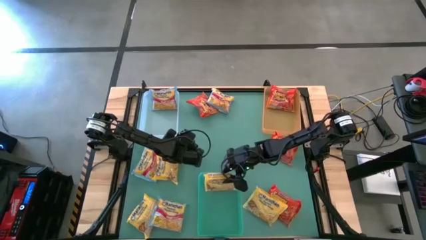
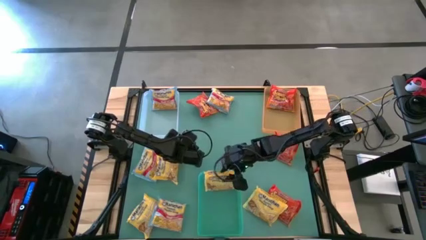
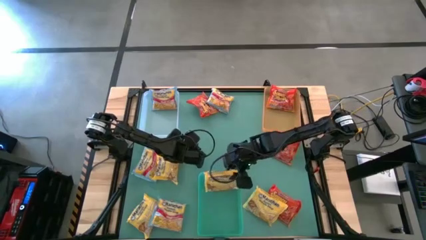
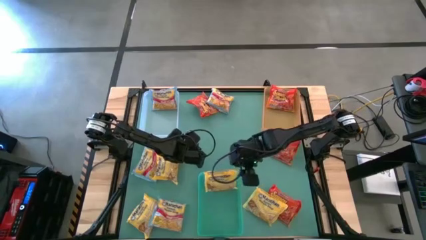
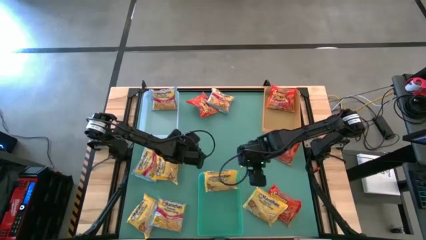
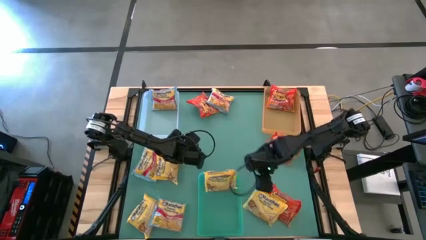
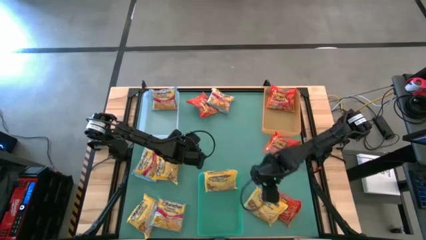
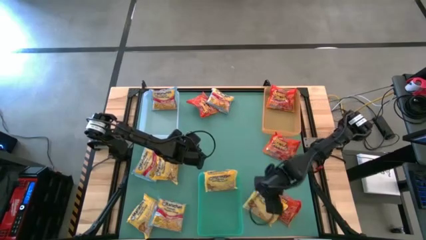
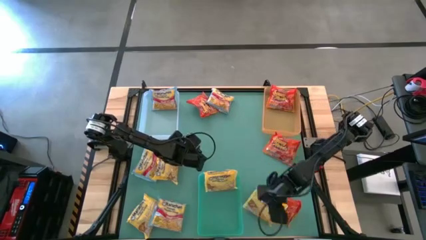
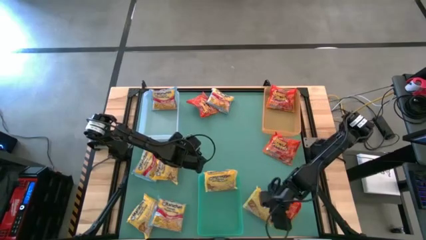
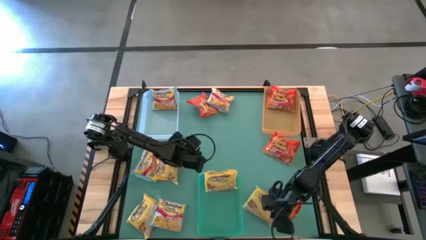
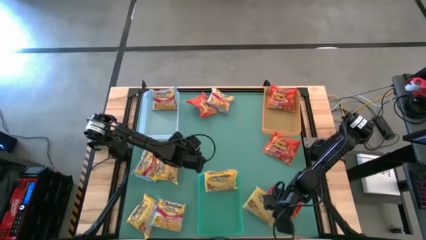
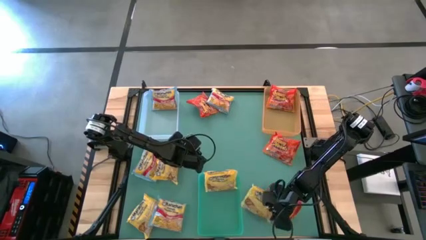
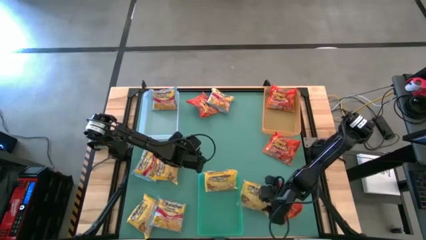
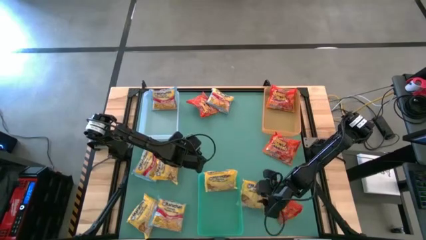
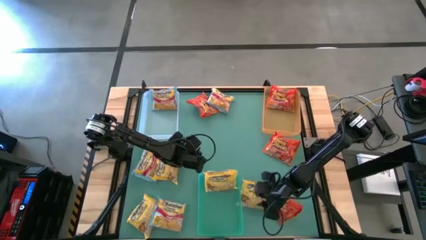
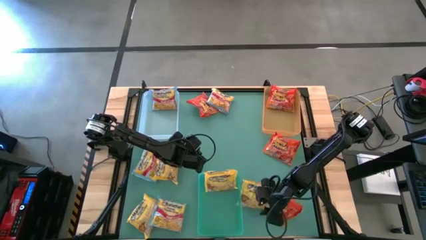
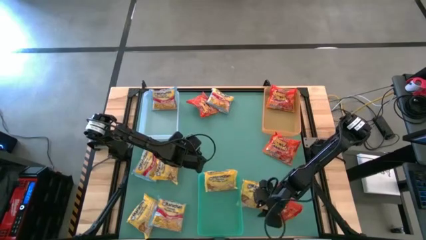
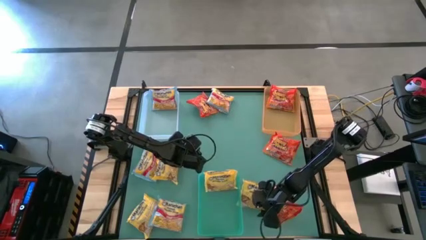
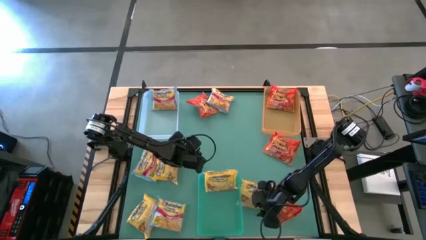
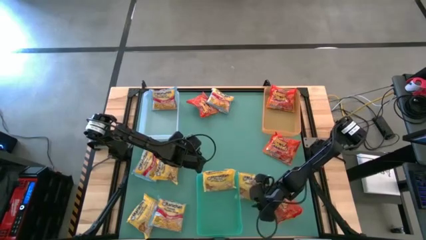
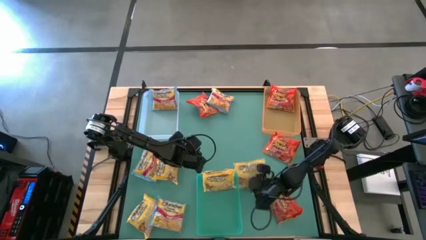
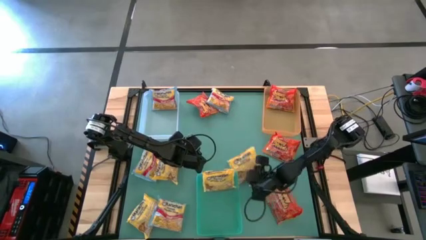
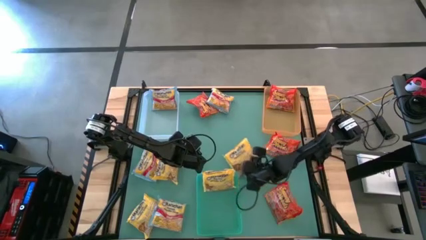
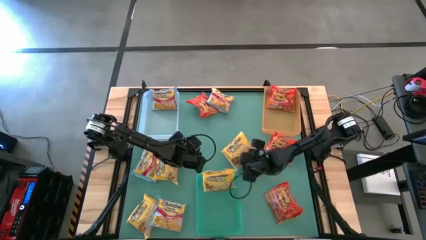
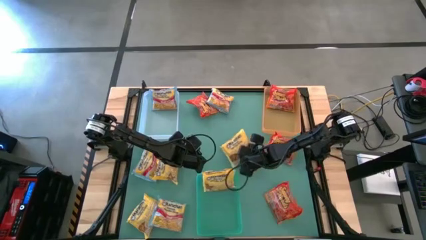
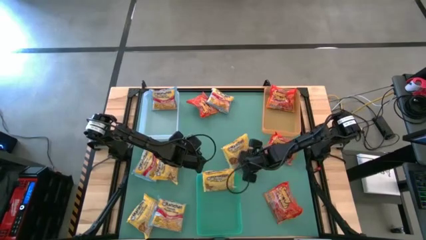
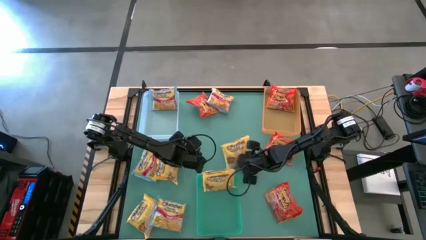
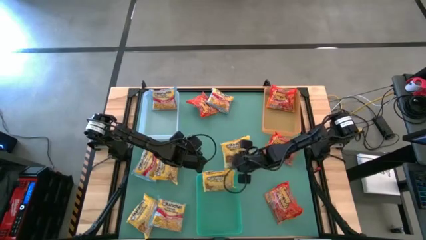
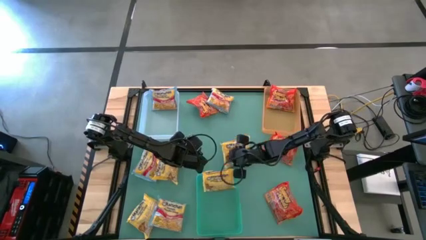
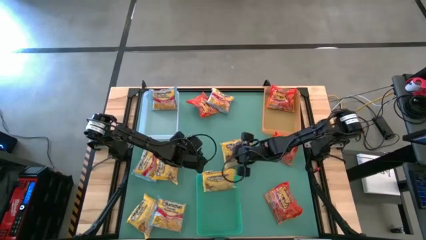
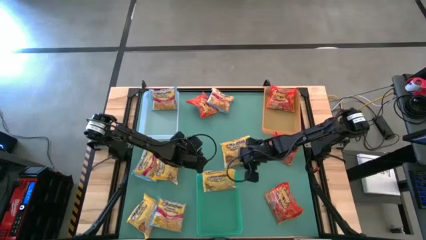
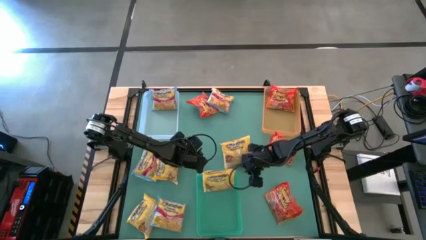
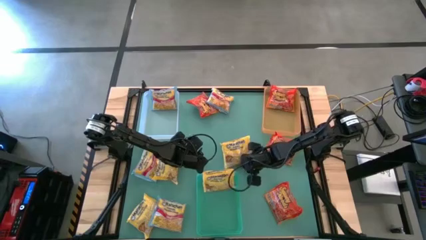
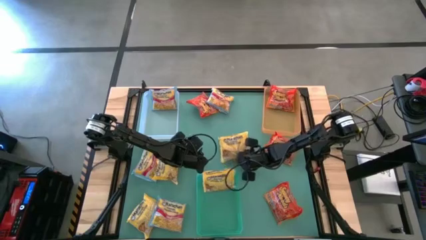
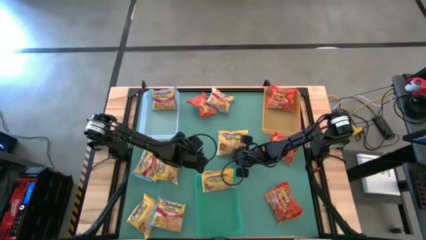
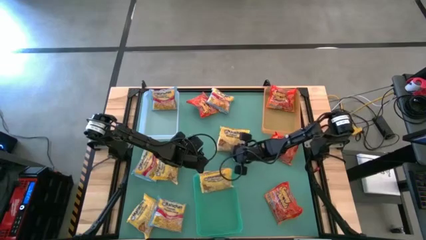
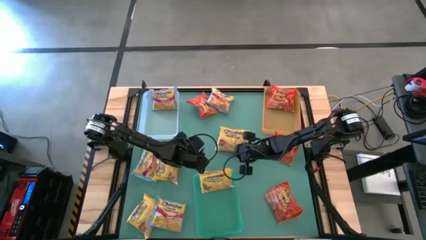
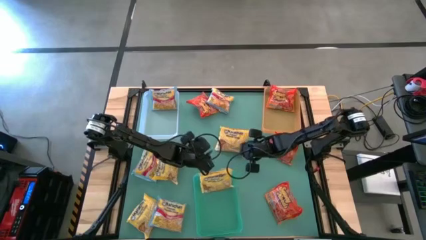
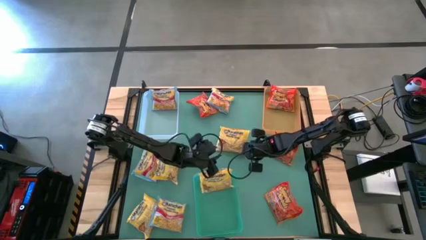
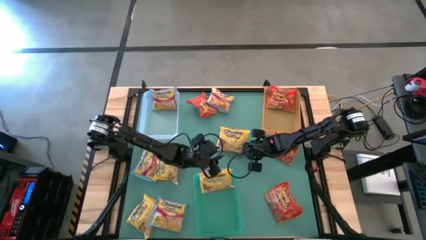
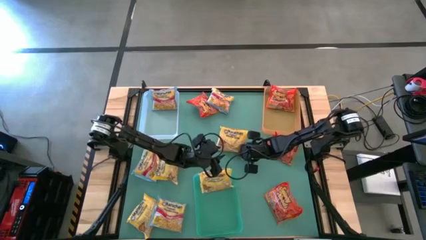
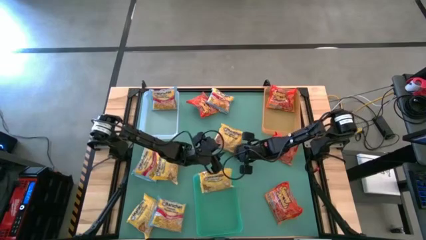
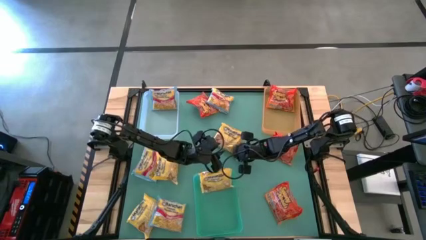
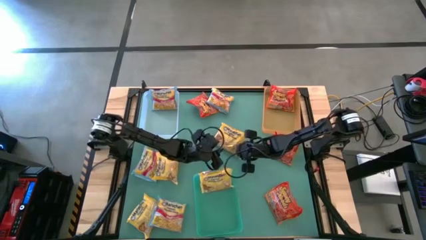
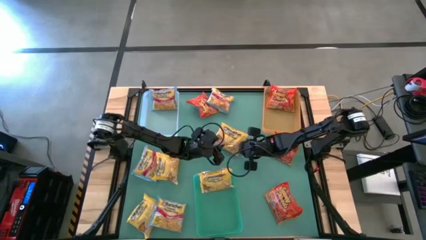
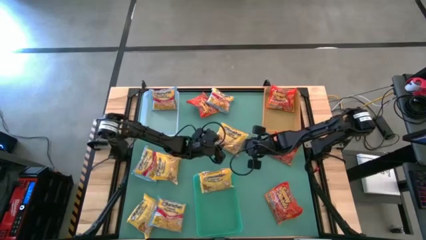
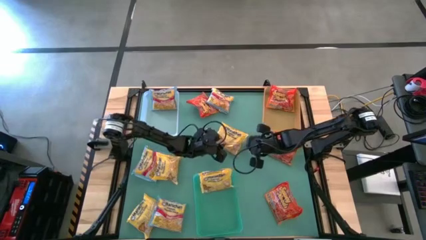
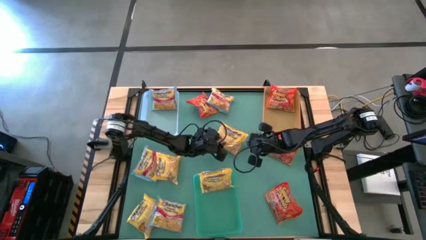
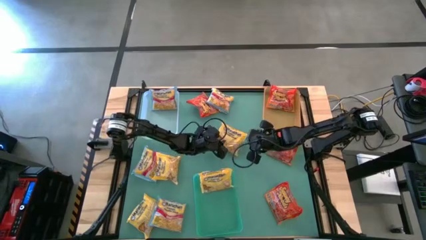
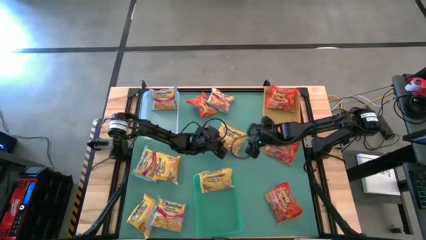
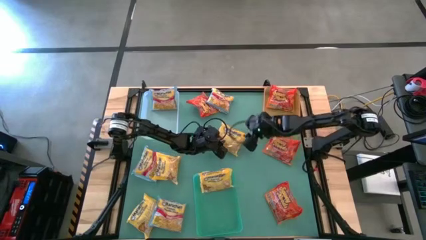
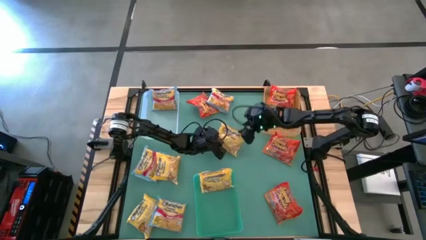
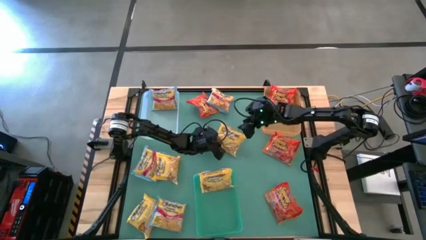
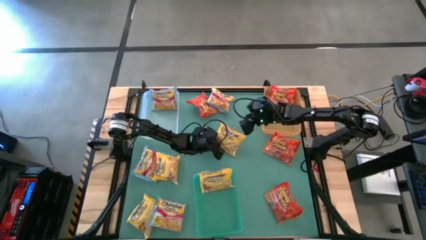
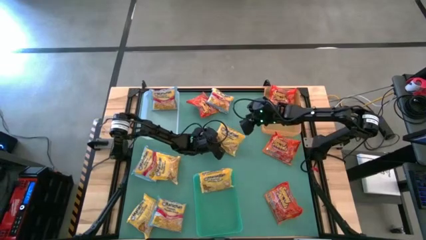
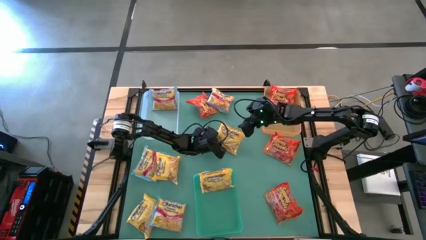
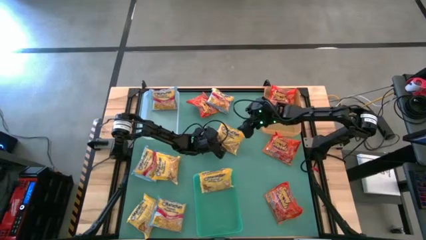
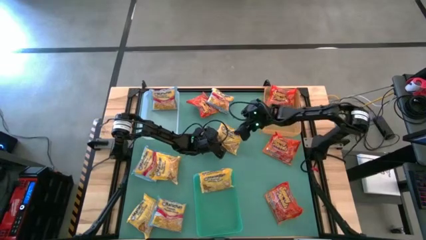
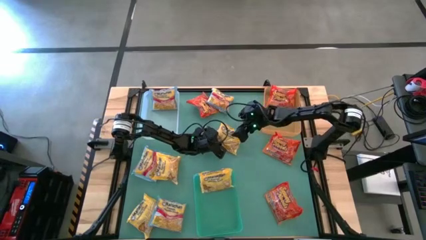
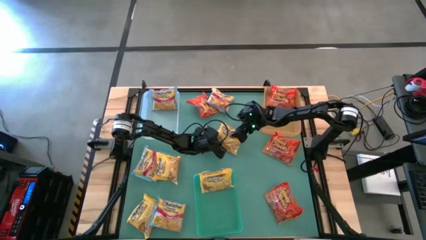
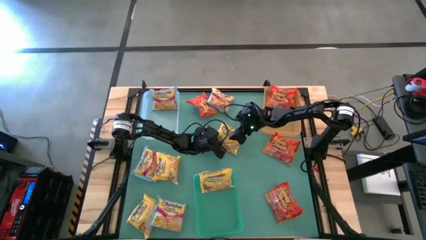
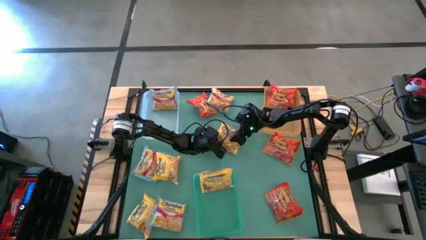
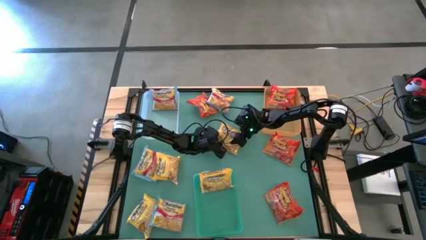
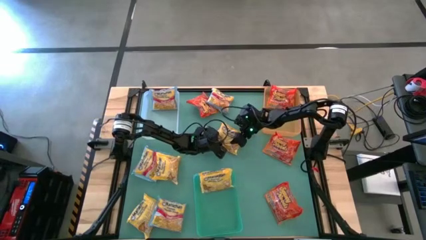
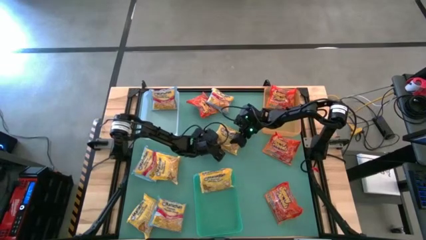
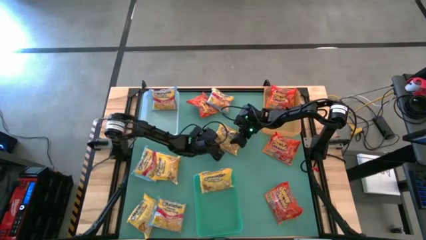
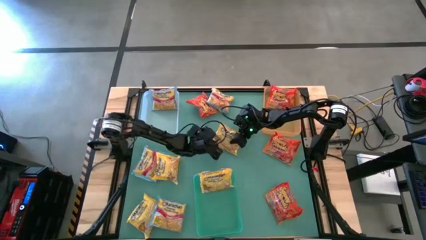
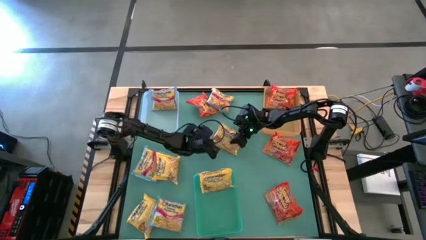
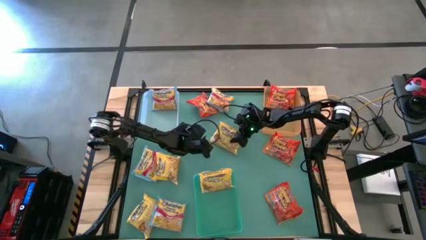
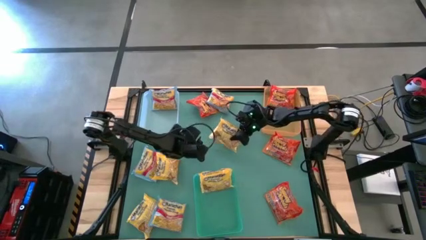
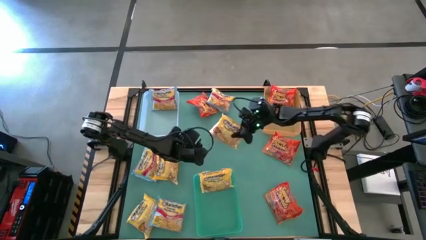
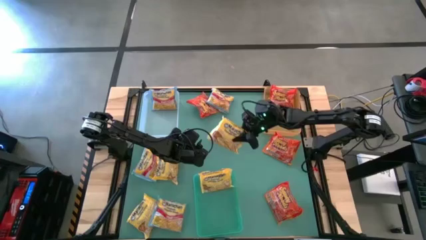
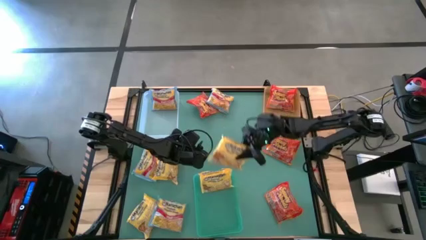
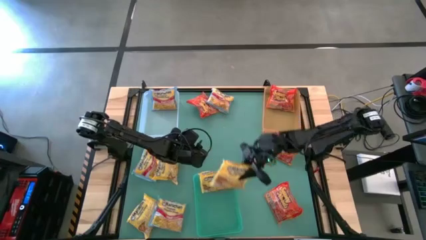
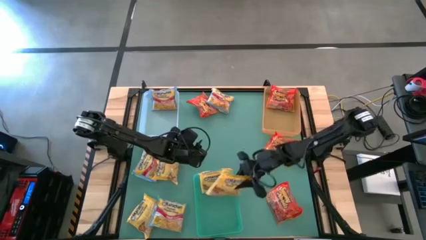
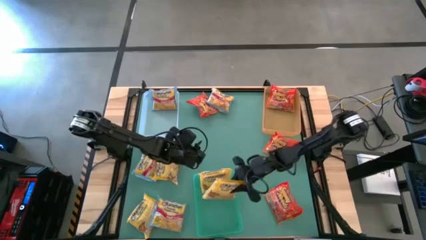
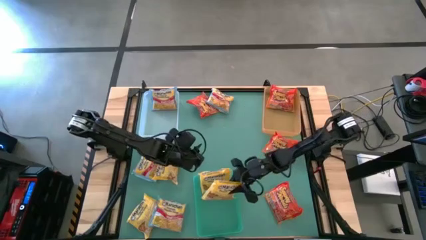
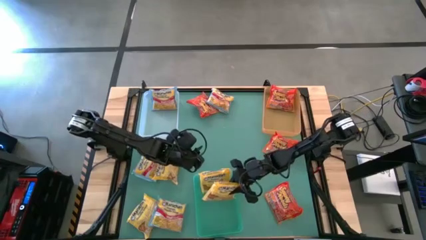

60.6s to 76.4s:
Task: Sort Maruchan noodles
Put the right yellow noodle pack into the green bin
